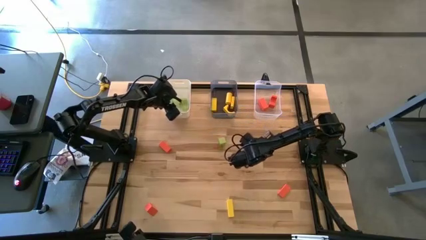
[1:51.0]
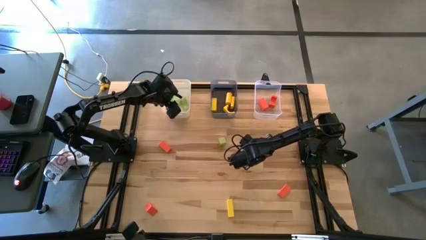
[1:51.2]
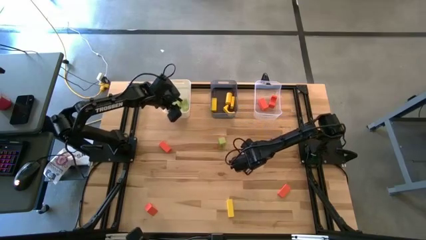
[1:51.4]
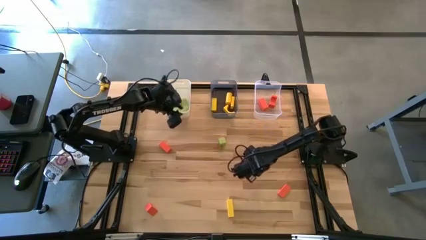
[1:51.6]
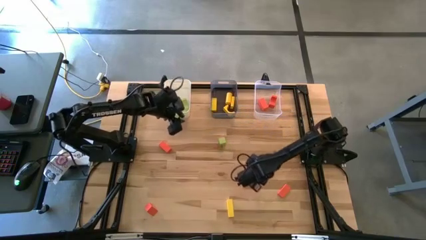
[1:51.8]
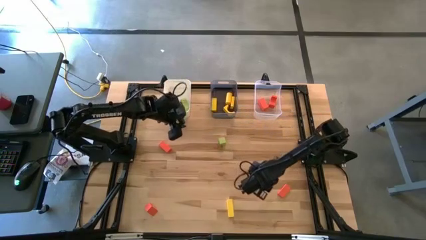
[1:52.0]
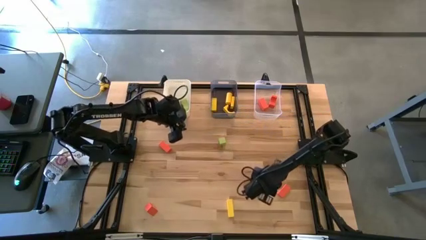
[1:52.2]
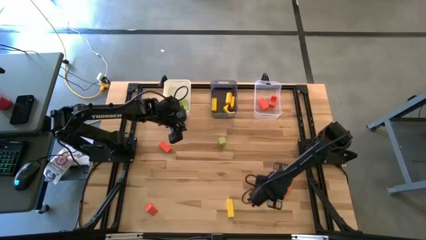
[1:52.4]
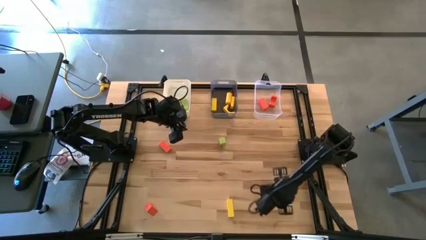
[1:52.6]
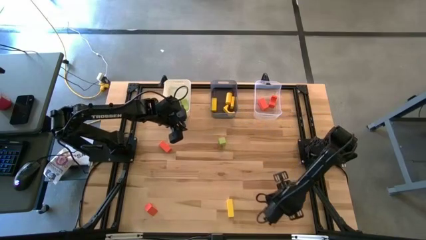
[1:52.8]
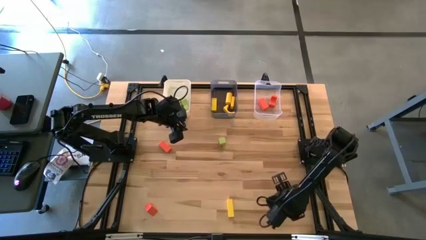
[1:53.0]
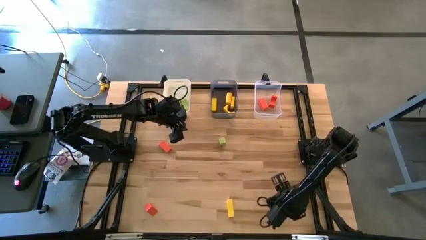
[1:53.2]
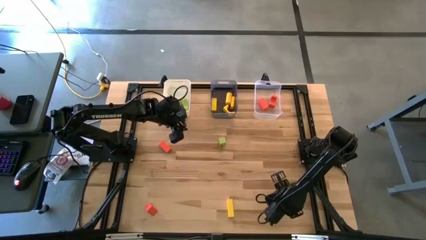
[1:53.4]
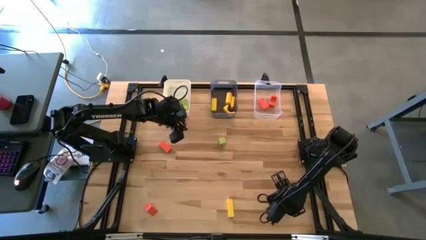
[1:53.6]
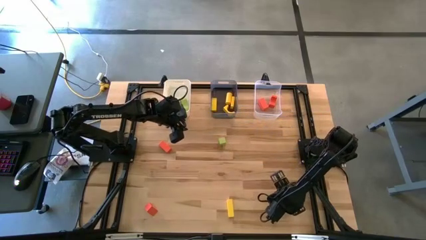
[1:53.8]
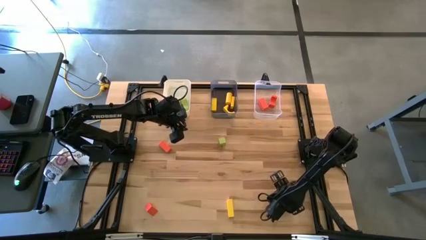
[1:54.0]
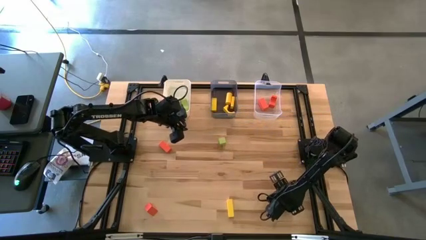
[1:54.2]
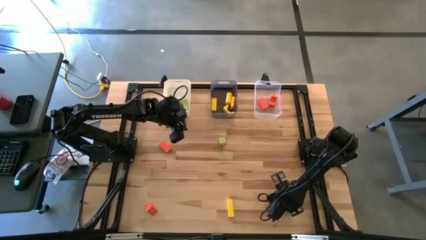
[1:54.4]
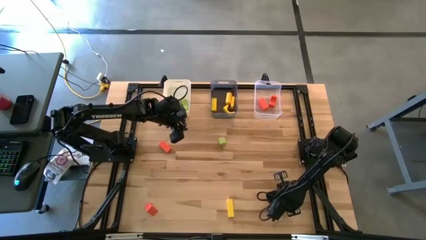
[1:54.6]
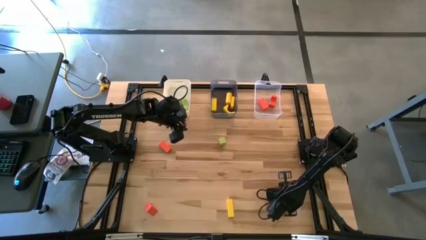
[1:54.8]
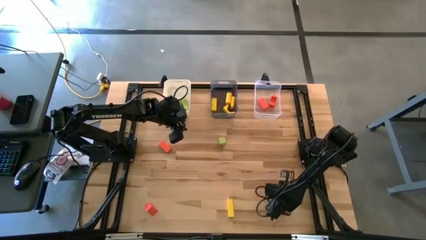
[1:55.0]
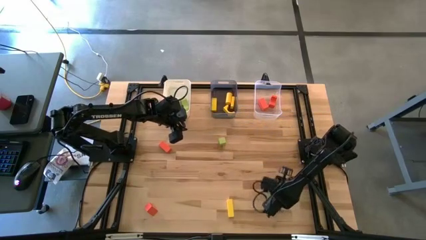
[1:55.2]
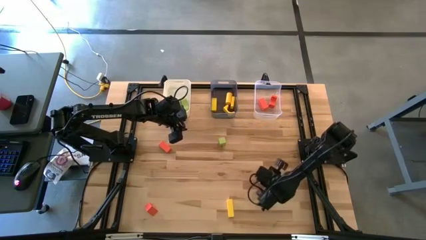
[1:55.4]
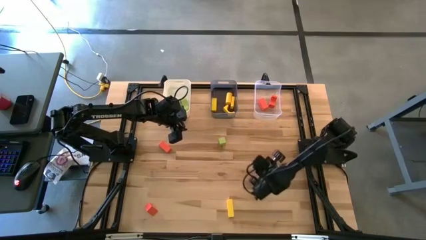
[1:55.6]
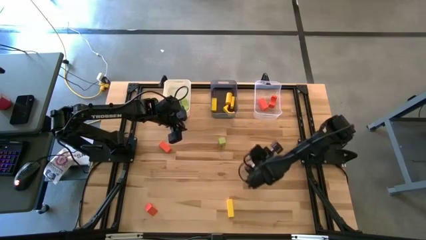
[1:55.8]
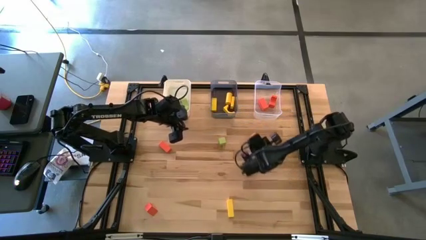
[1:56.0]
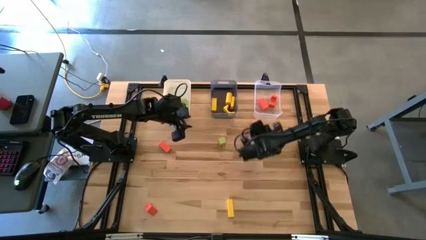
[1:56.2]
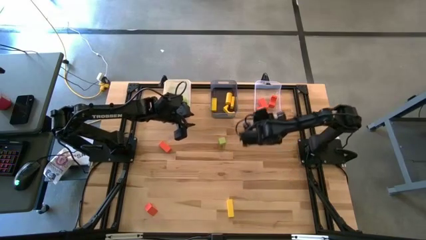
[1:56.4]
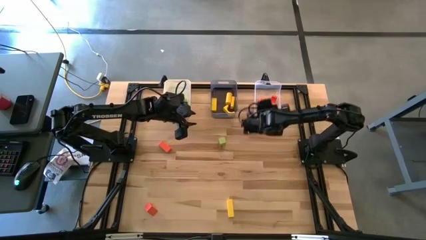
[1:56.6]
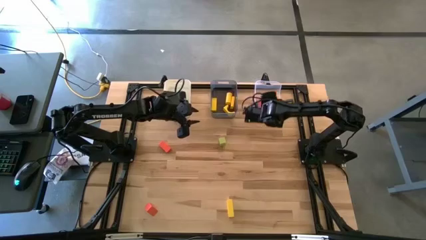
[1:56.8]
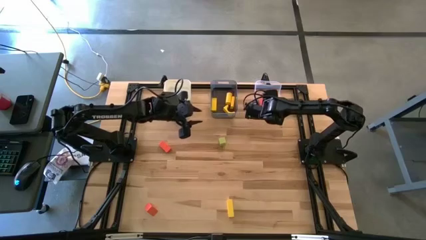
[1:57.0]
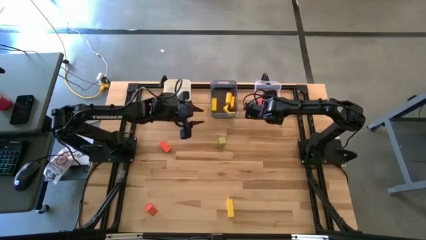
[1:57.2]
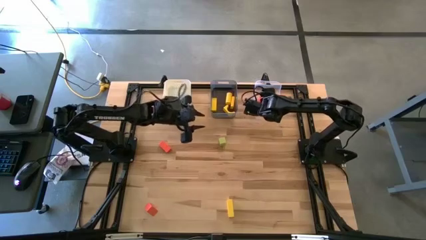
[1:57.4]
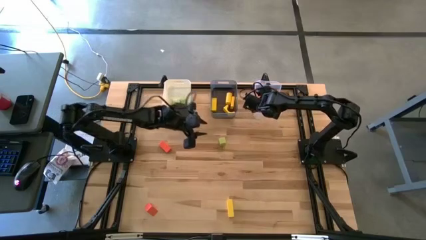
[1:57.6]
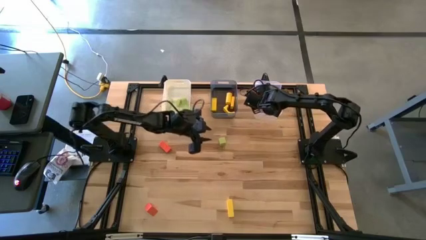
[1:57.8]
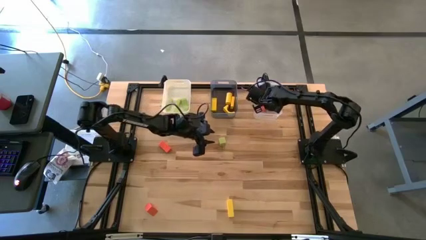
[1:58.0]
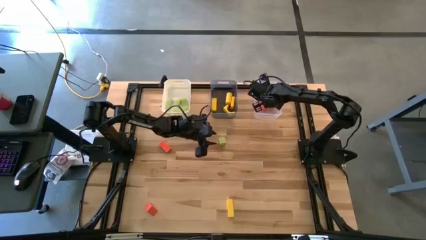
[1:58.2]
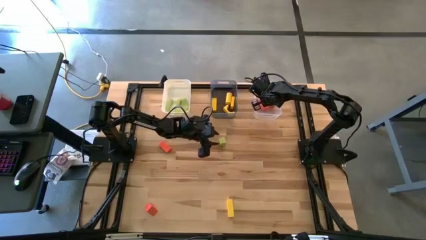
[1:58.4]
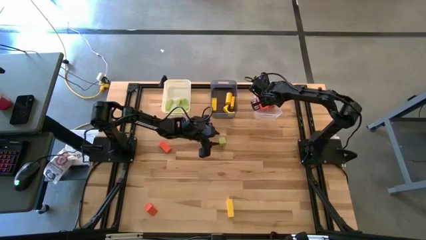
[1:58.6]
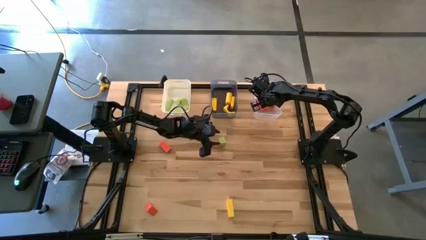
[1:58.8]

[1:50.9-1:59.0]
Task: Sort & place blocks by color
Put the orange block into the transparent bin

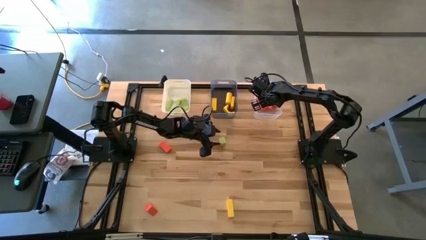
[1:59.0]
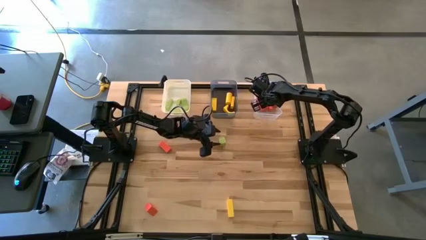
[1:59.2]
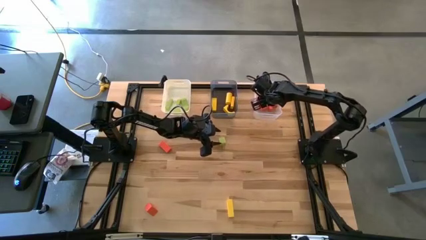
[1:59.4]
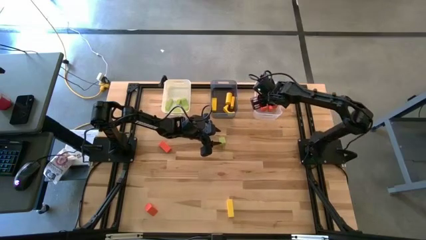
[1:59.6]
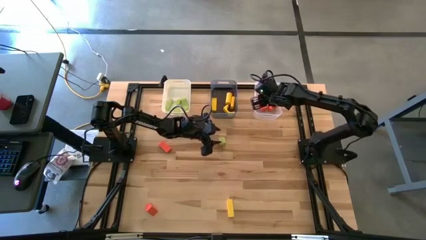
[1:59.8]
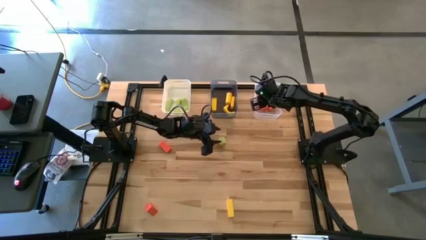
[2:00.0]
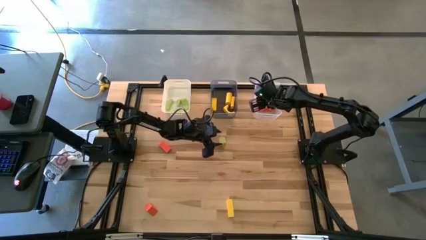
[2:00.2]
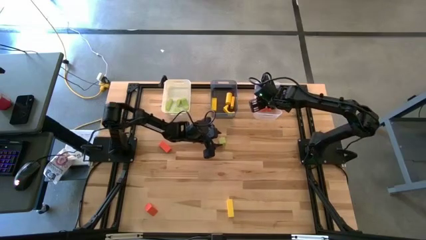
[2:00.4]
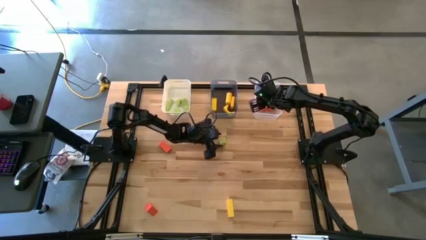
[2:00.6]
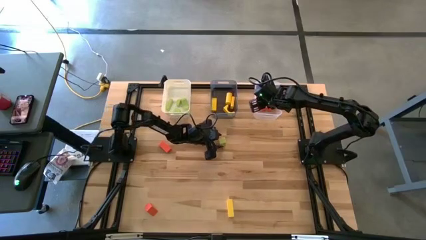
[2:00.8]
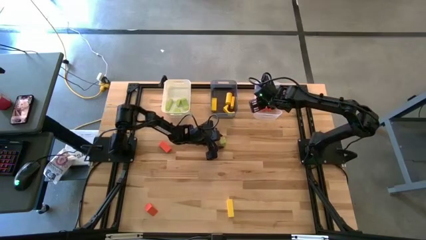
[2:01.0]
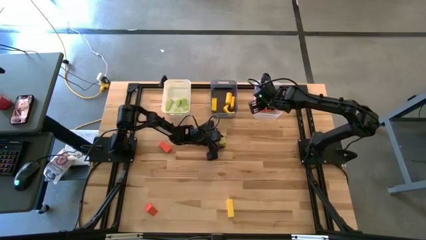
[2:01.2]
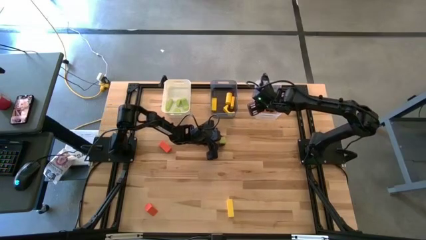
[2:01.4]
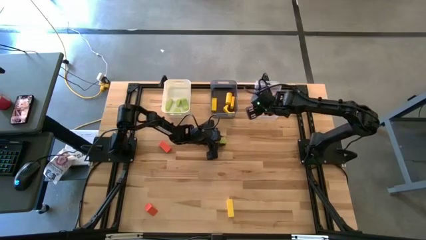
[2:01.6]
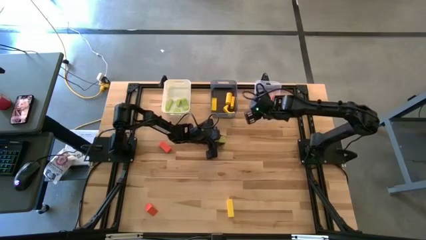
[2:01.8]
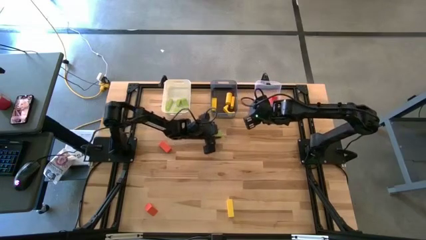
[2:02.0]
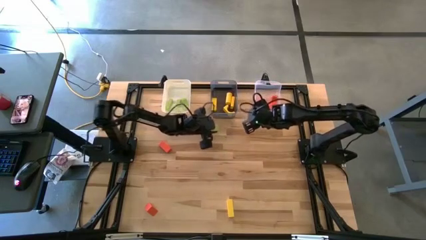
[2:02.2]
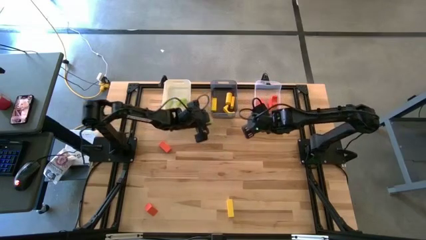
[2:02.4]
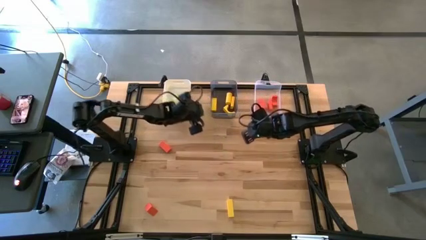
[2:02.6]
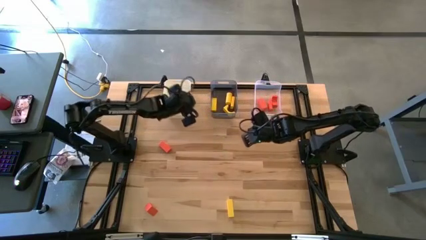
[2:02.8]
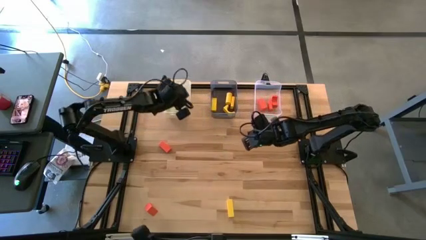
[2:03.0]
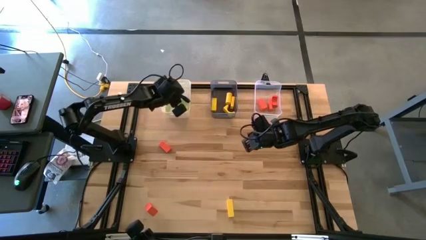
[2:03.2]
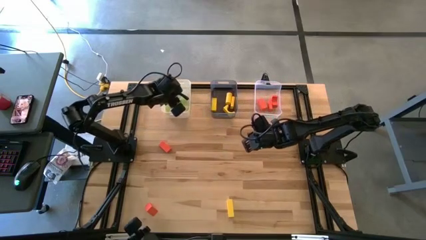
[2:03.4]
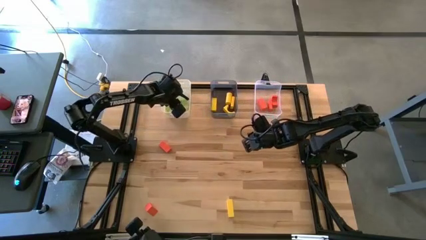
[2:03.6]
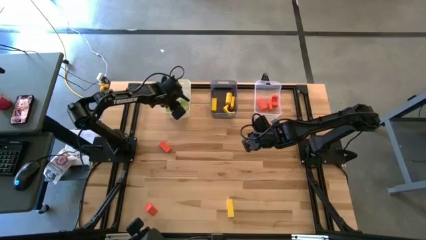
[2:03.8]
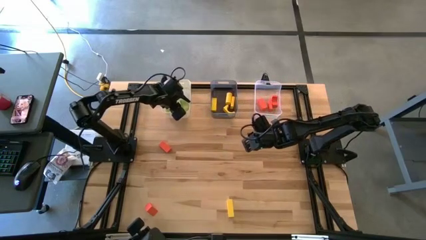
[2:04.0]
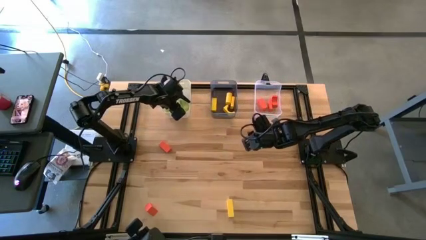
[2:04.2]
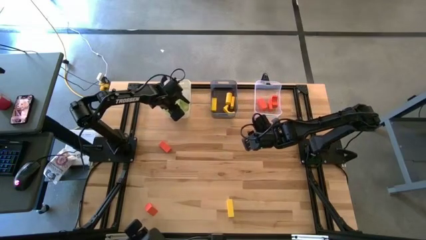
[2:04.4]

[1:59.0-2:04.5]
Put the block into the white bin

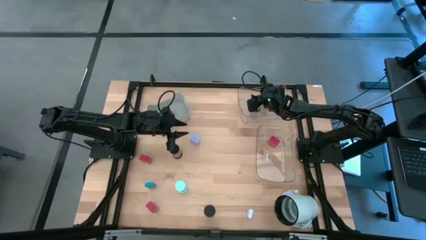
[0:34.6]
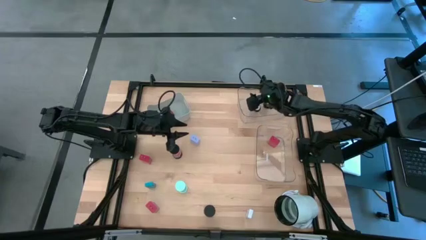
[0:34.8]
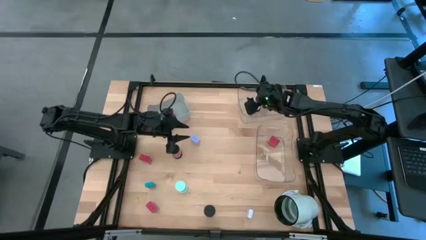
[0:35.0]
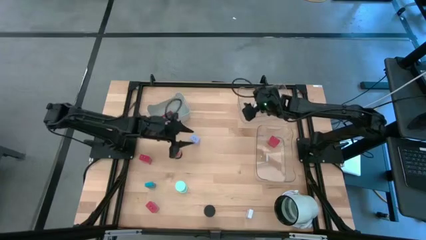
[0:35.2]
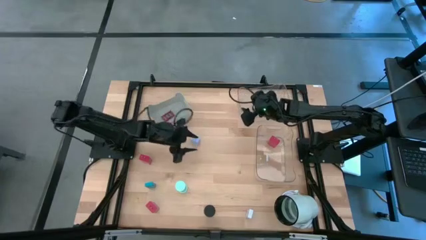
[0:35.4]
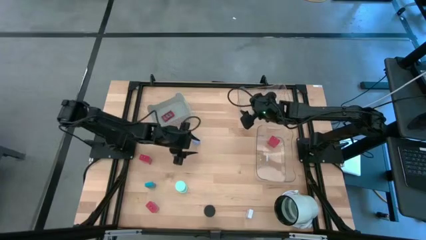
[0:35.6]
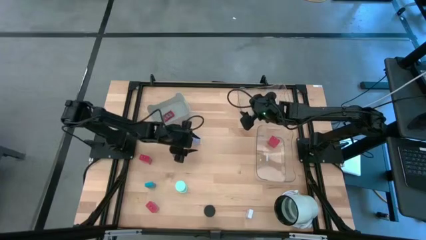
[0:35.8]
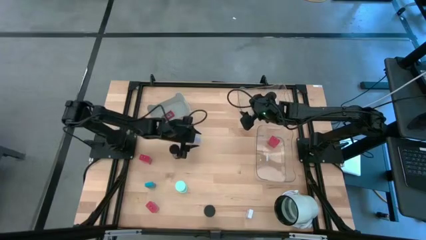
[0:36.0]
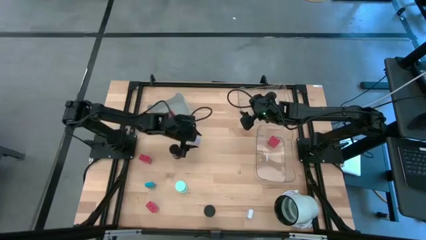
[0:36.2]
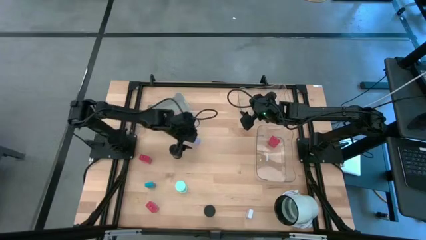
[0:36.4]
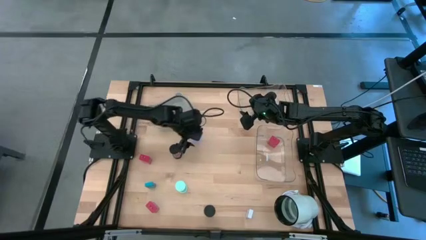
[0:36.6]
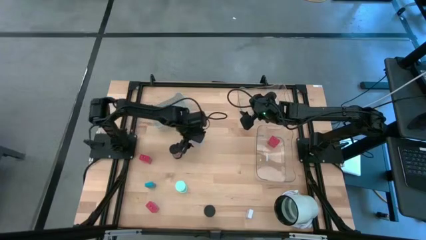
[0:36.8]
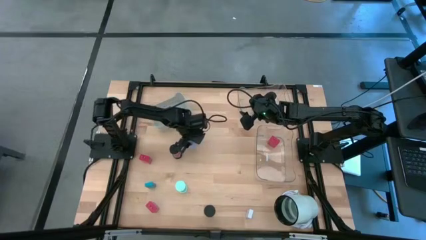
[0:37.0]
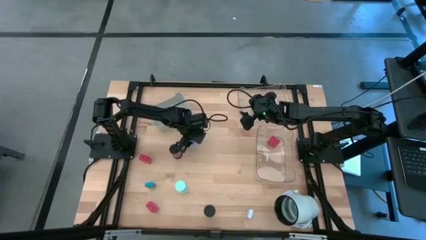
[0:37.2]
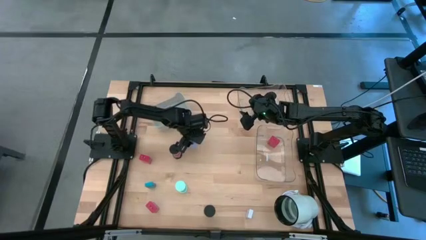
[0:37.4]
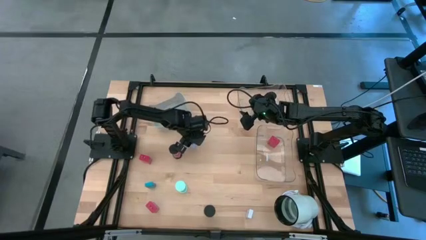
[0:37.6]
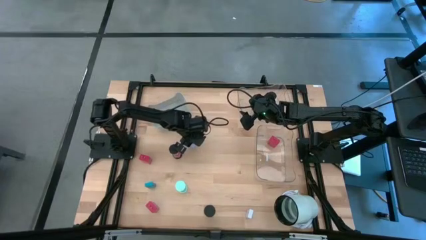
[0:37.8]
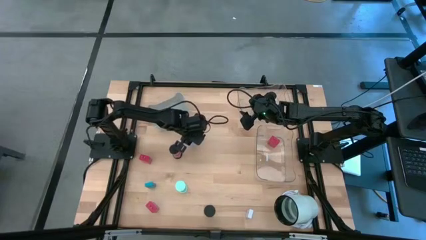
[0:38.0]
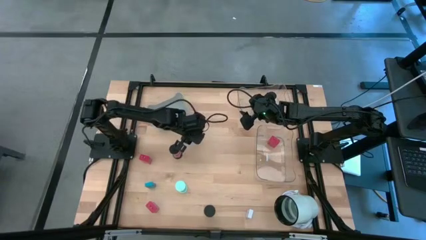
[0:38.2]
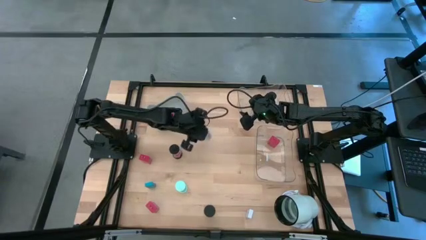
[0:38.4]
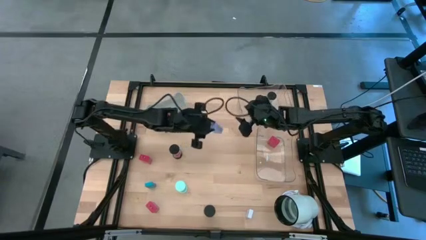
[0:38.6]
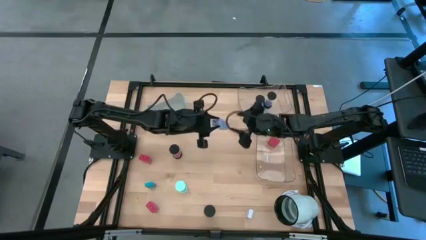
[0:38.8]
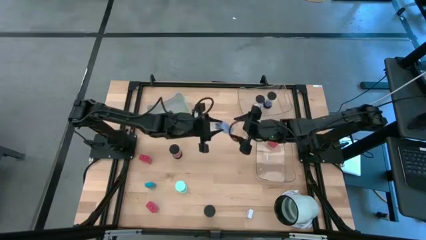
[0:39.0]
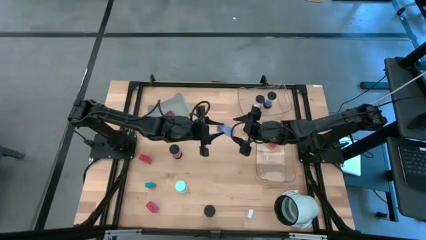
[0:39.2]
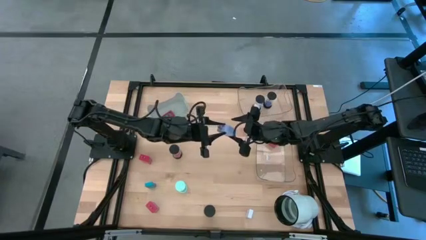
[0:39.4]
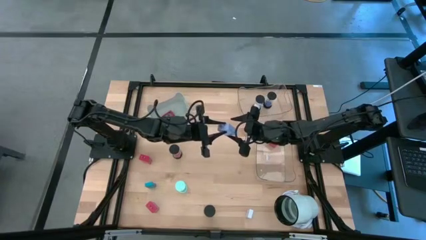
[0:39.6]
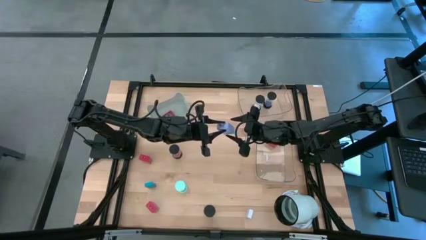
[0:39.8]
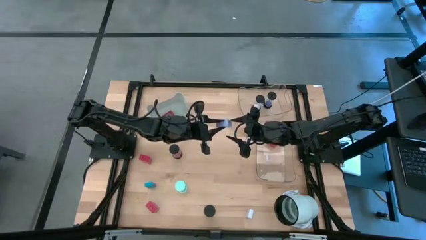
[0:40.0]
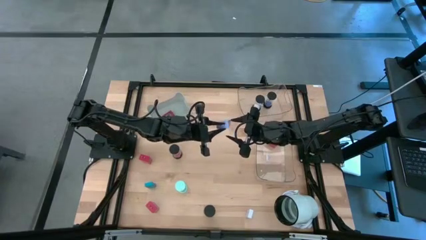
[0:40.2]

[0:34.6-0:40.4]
Task: Pick & Place Office items
Put the purple charger adapter into the bottom transparent bin
